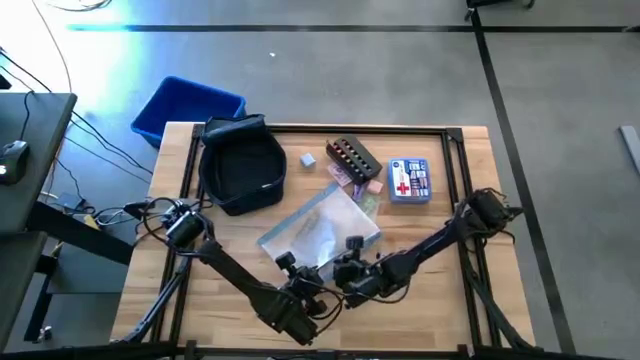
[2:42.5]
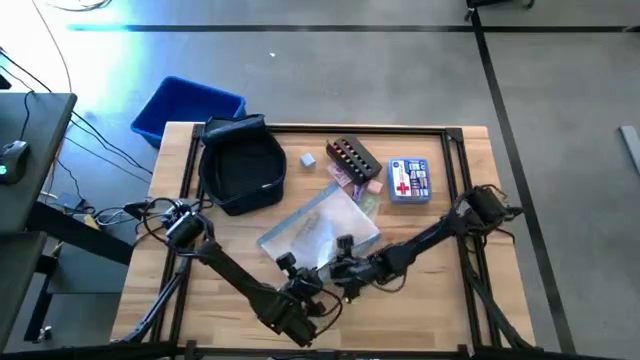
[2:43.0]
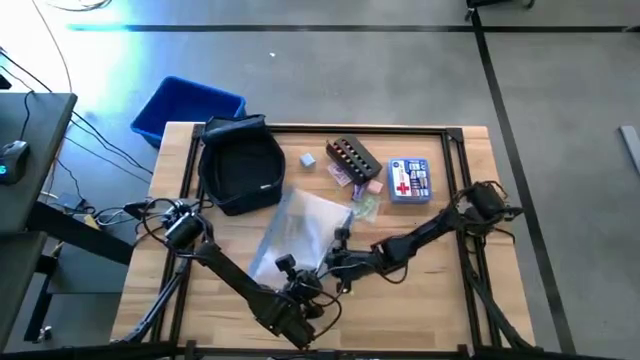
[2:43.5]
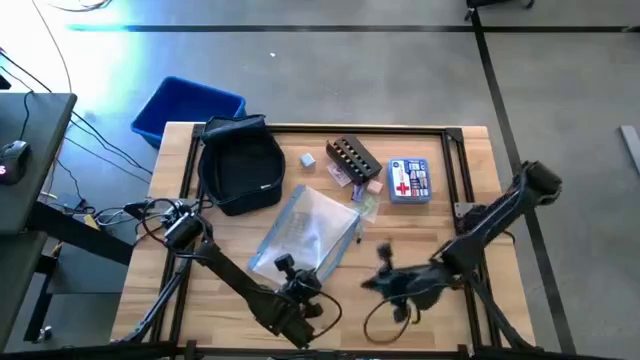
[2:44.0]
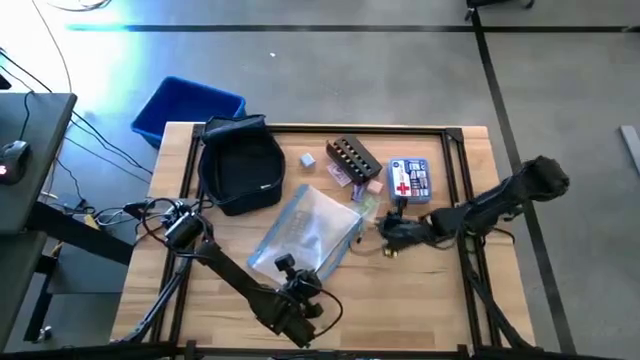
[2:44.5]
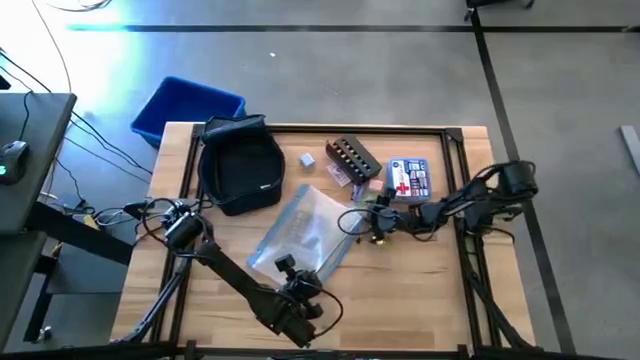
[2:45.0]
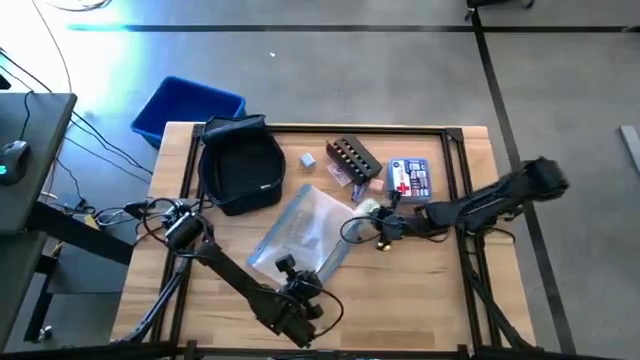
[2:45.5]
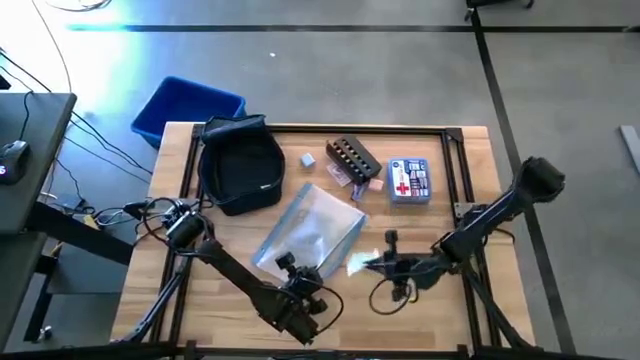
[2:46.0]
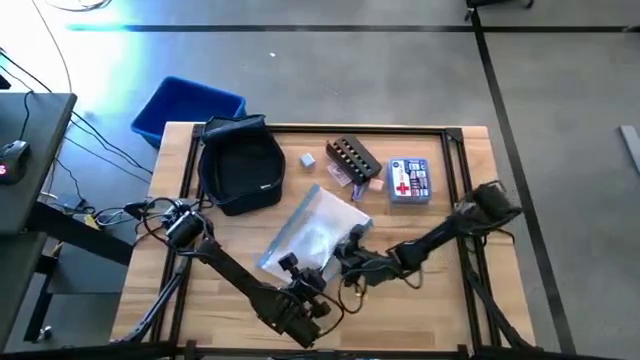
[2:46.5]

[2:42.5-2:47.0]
Task: Unpack backpack
Put the packed earphones into the zip bag

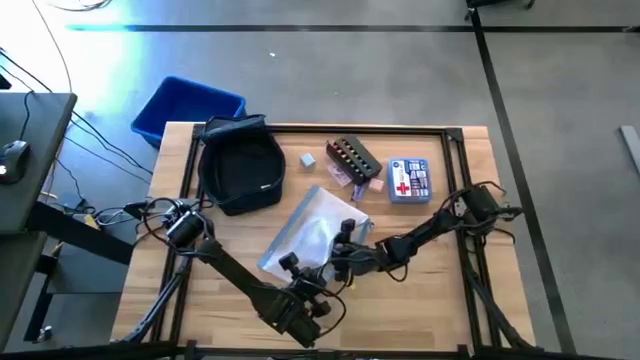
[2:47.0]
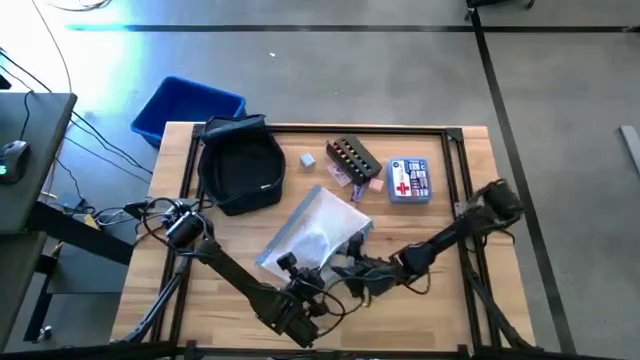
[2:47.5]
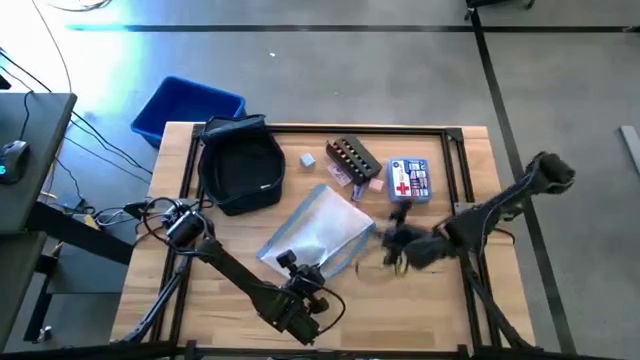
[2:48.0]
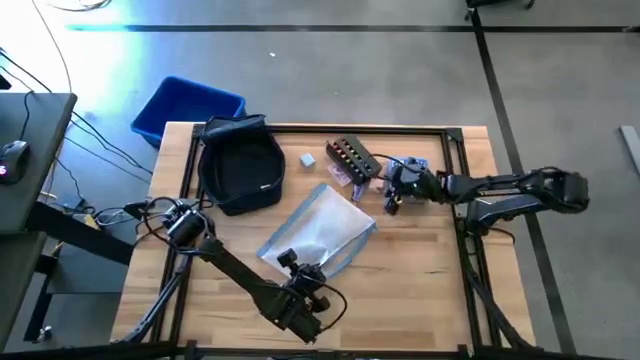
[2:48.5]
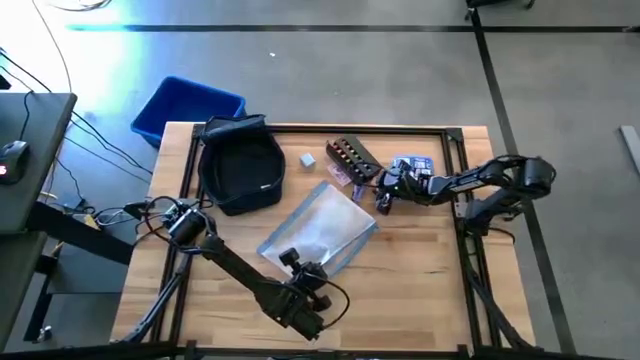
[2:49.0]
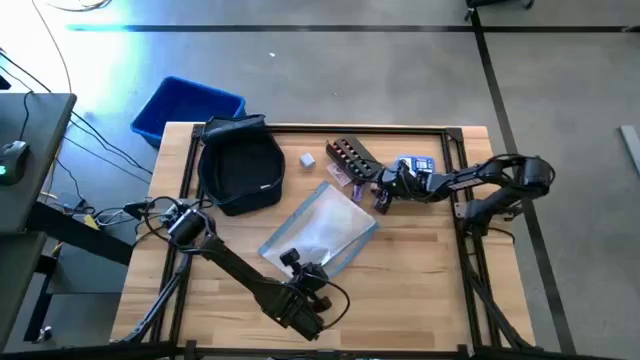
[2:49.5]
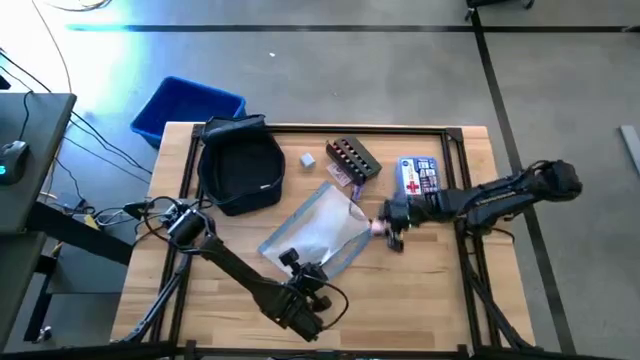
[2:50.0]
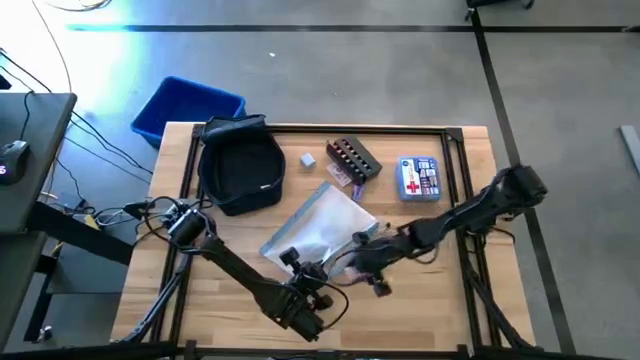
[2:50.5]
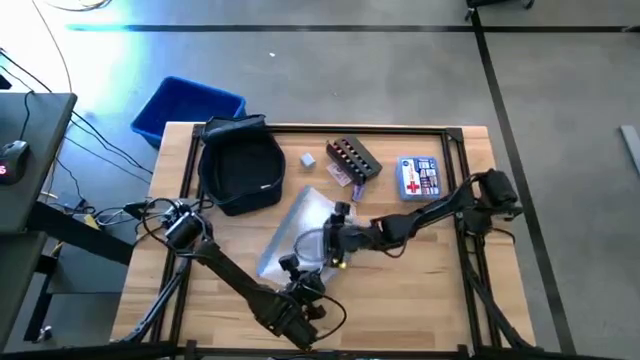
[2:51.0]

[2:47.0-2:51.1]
Put the pink adapter from the white zip bag

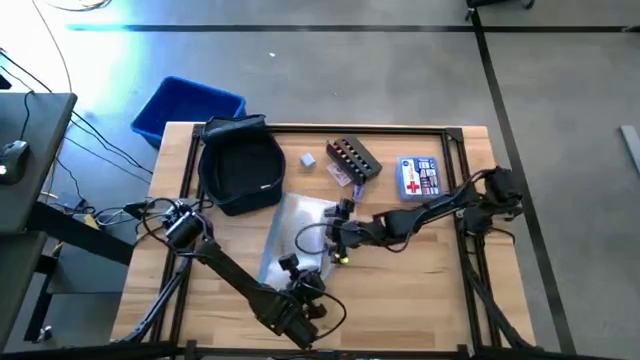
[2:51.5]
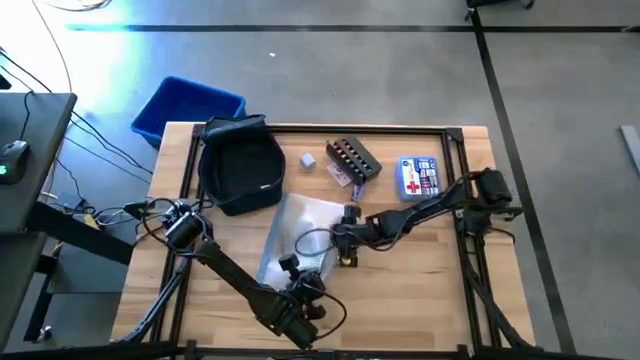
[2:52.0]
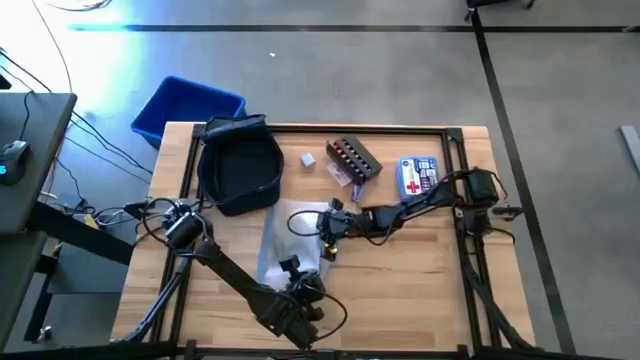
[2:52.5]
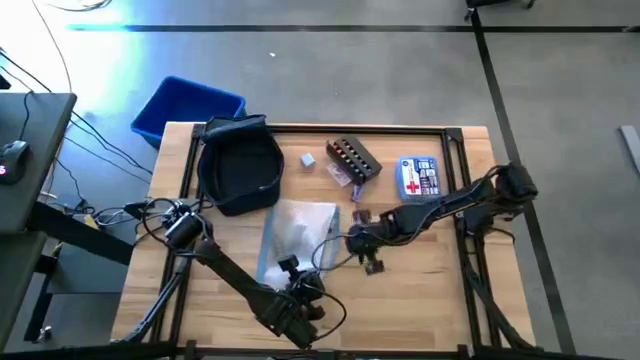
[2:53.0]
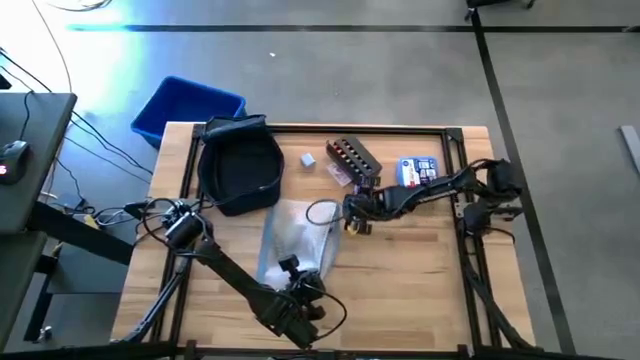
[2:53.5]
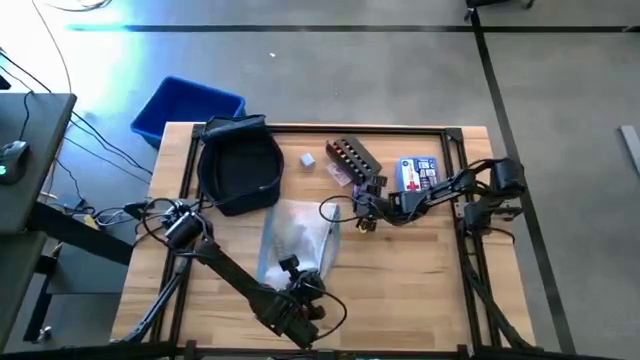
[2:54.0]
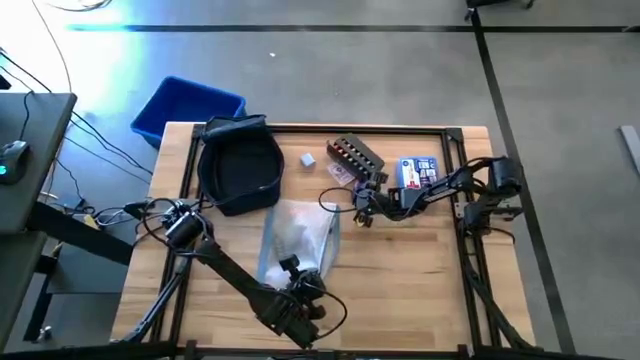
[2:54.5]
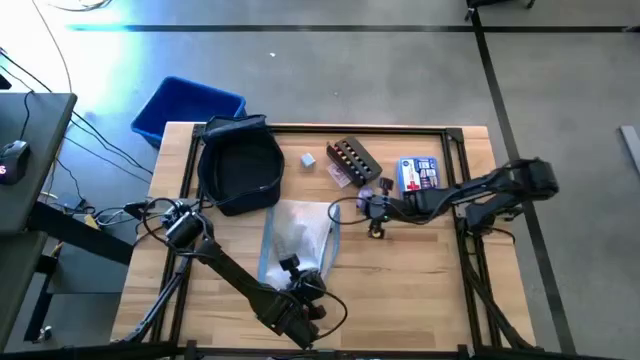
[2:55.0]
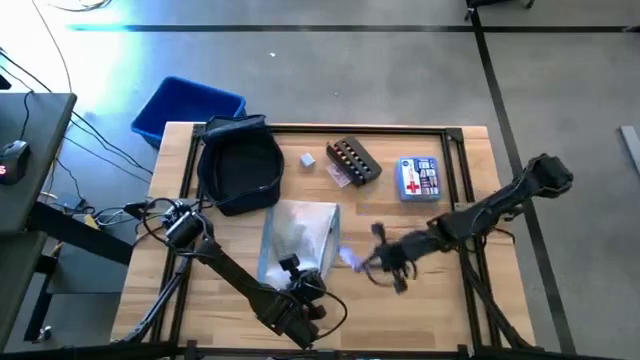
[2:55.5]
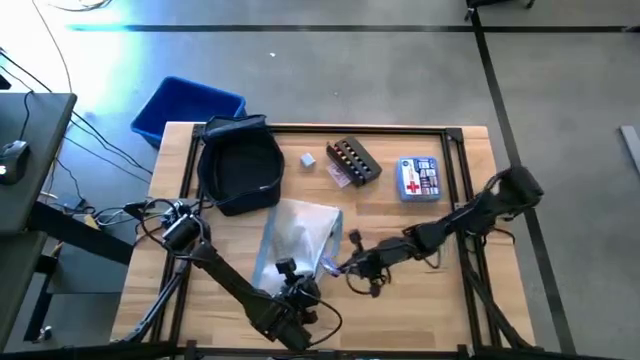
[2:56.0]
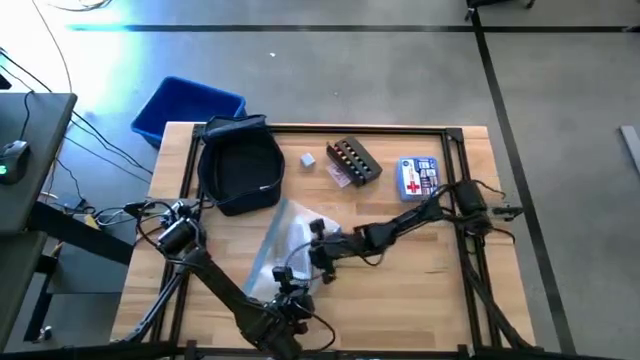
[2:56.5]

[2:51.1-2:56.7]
Put the purple snack bar into the white zip bag

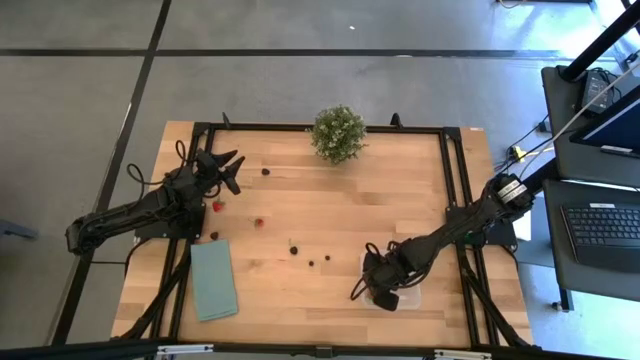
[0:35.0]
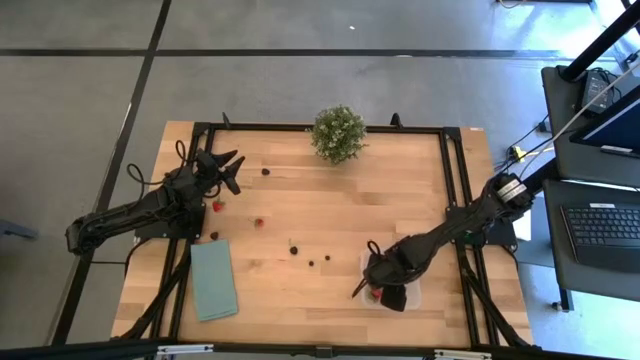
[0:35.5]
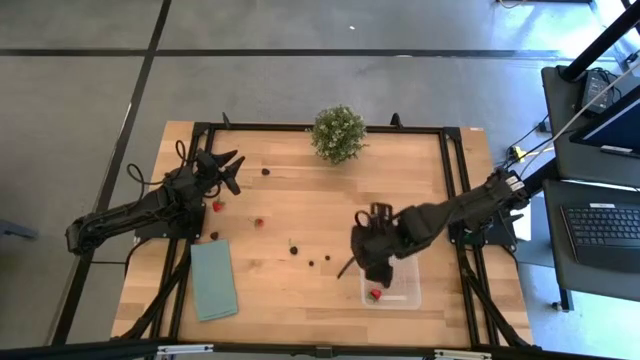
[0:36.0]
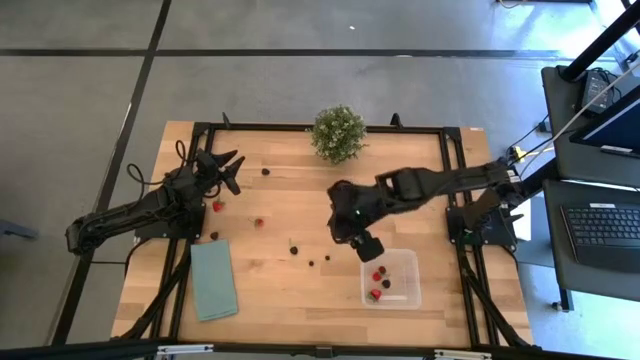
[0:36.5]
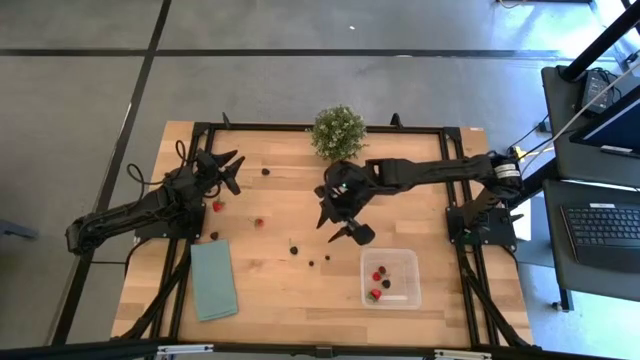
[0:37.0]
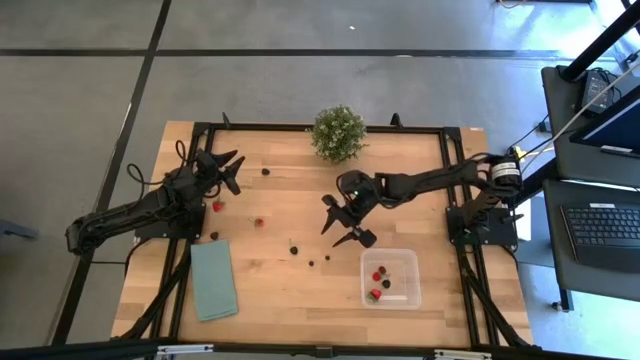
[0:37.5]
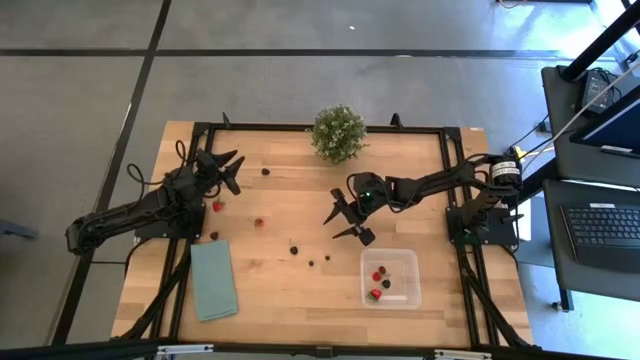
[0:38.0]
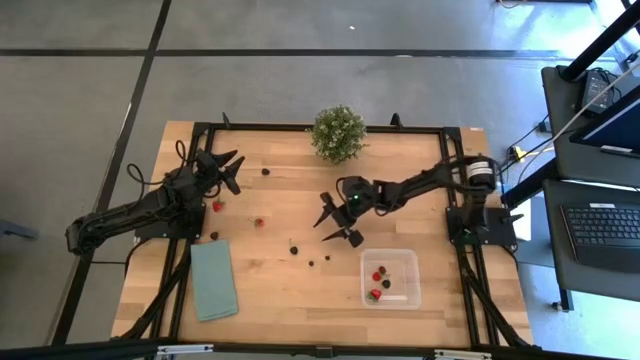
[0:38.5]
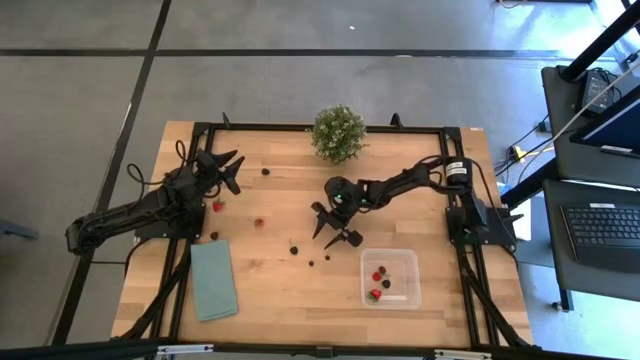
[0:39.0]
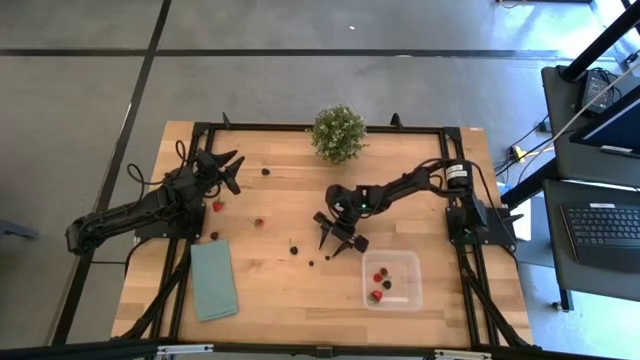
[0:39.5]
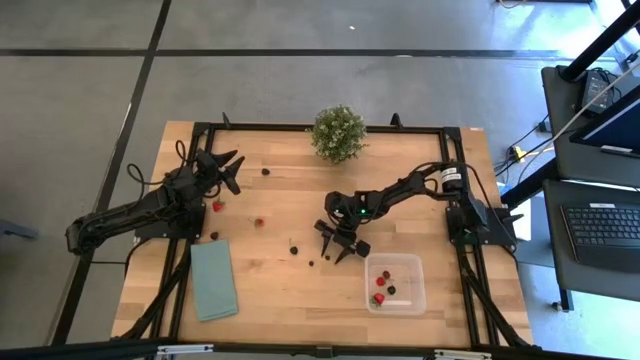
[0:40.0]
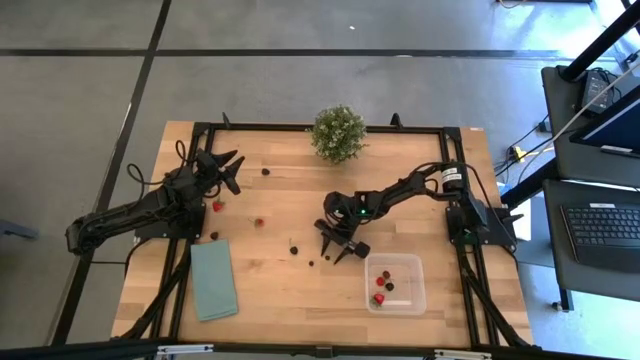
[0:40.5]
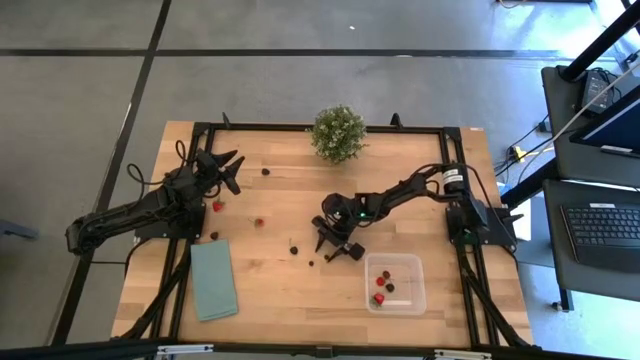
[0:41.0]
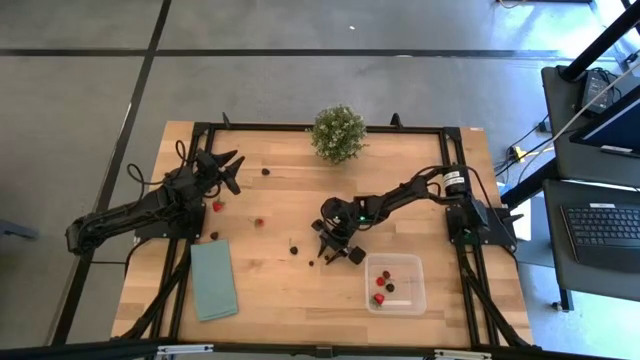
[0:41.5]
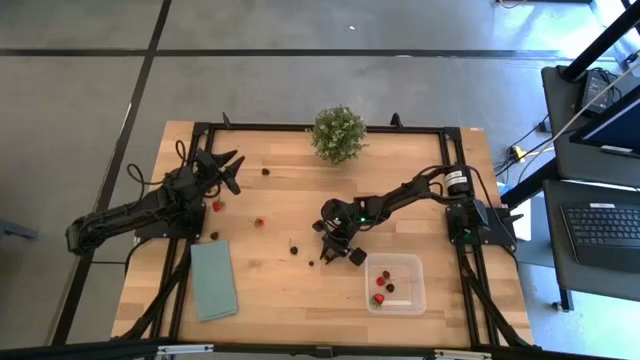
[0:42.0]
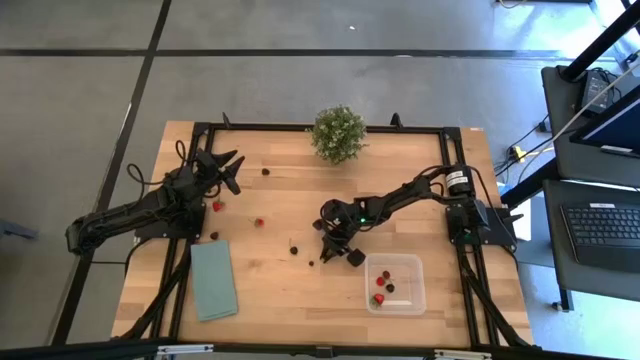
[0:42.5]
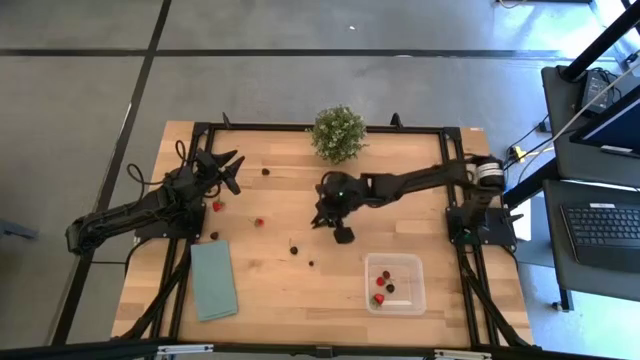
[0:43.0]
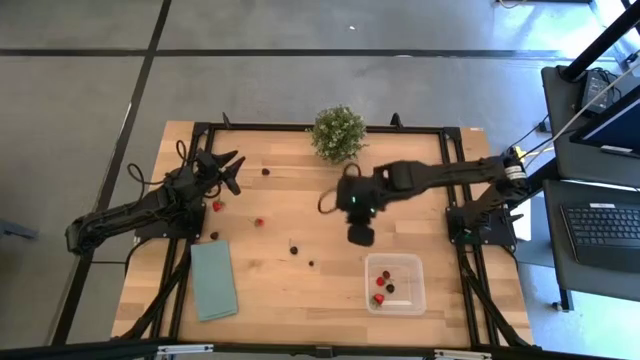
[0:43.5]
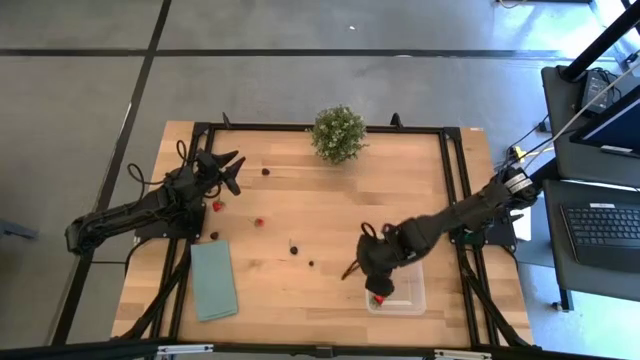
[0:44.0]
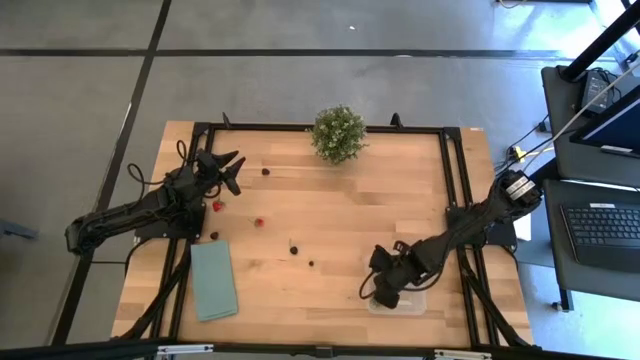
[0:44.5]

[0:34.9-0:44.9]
Task: Pick and placing Produce into tupperware
Put the right blueberry into the bin
